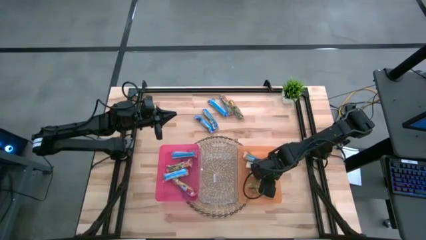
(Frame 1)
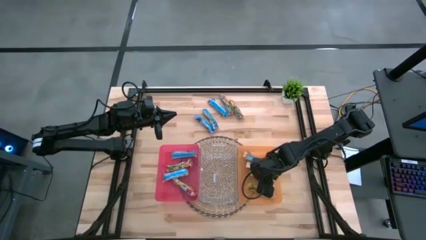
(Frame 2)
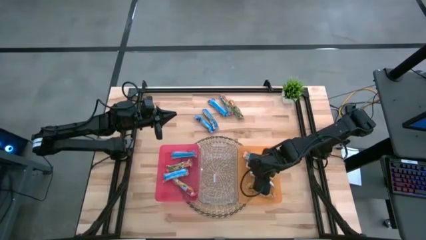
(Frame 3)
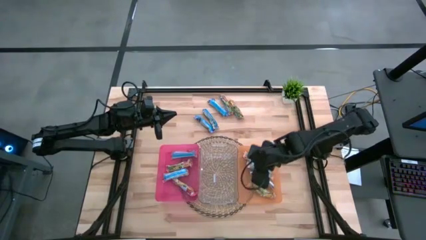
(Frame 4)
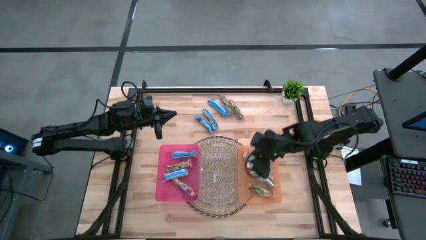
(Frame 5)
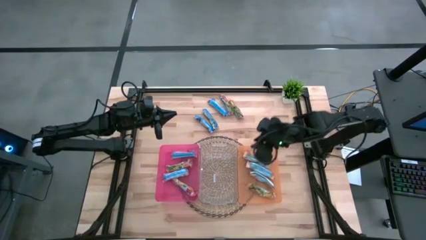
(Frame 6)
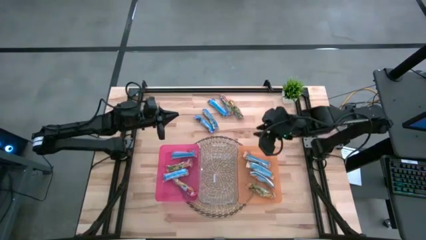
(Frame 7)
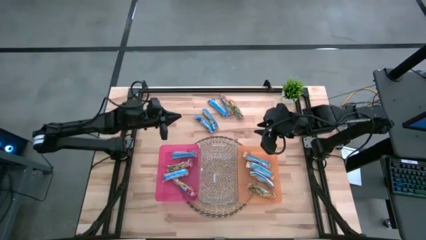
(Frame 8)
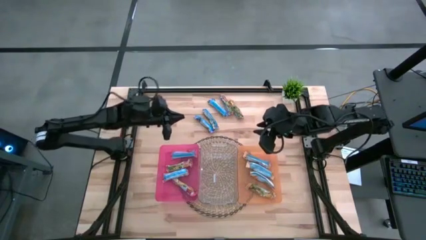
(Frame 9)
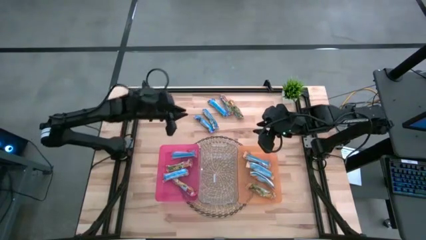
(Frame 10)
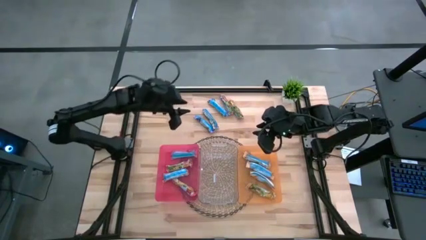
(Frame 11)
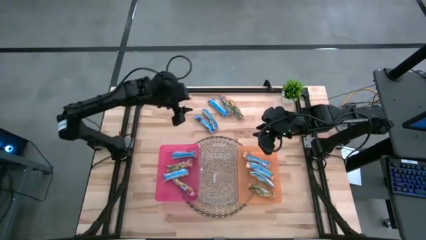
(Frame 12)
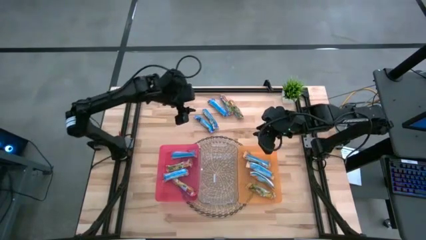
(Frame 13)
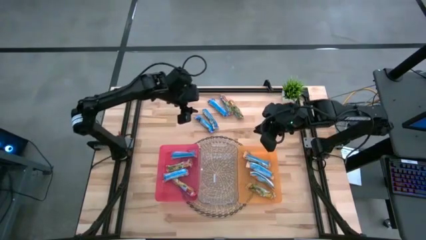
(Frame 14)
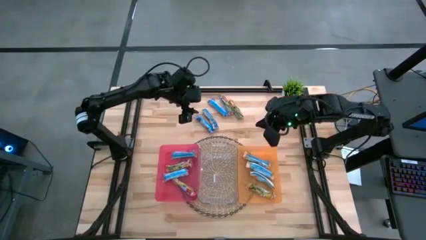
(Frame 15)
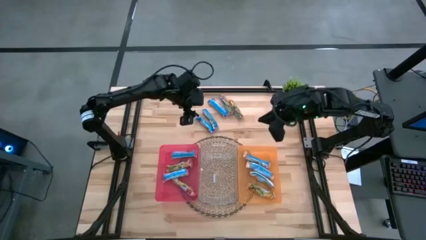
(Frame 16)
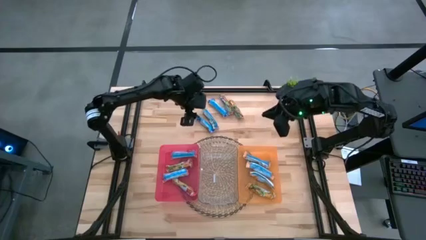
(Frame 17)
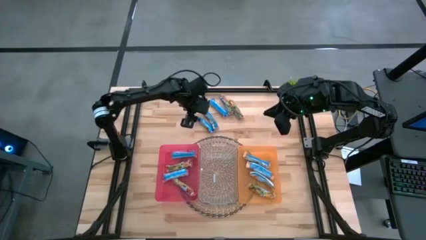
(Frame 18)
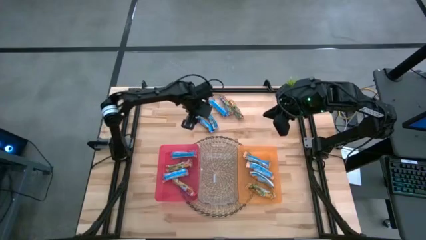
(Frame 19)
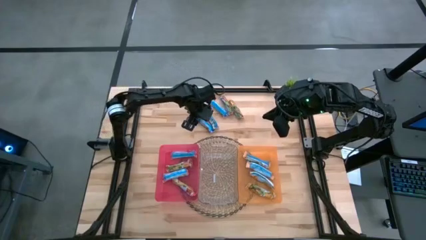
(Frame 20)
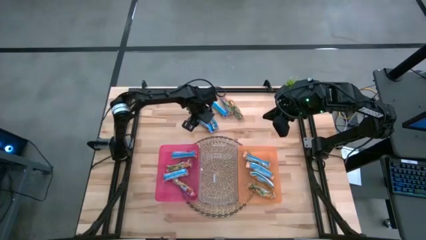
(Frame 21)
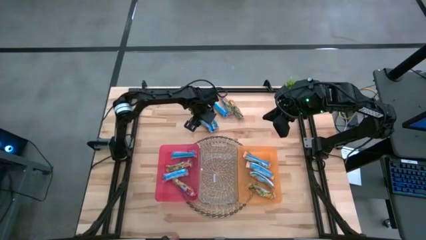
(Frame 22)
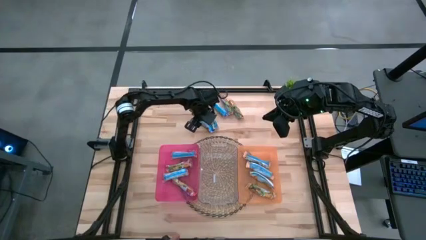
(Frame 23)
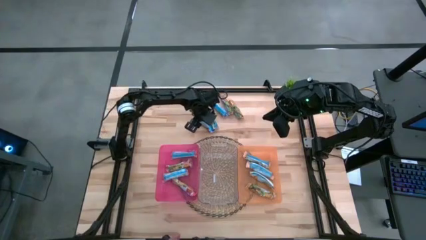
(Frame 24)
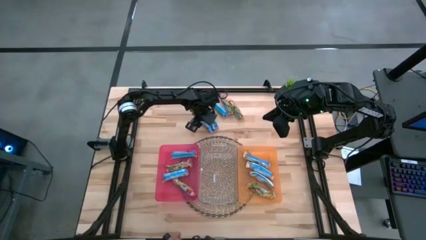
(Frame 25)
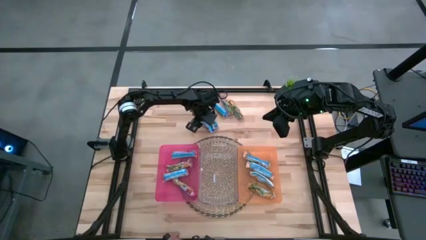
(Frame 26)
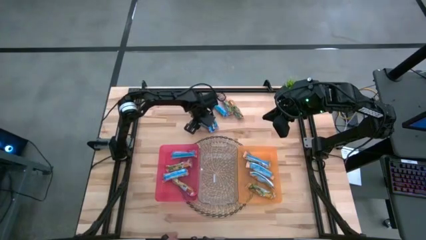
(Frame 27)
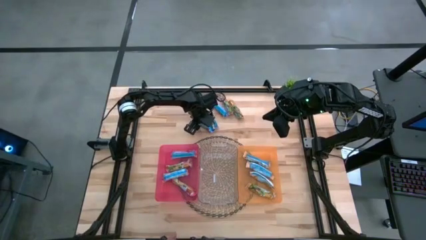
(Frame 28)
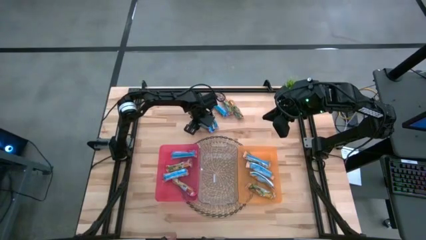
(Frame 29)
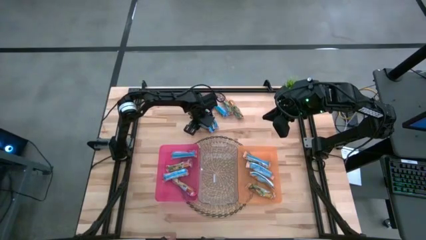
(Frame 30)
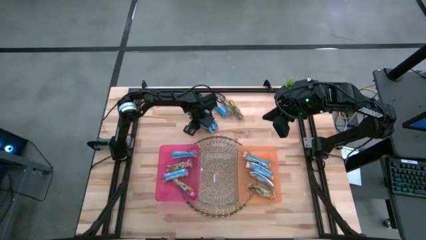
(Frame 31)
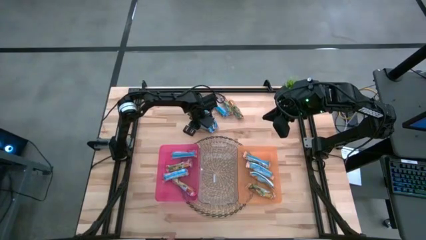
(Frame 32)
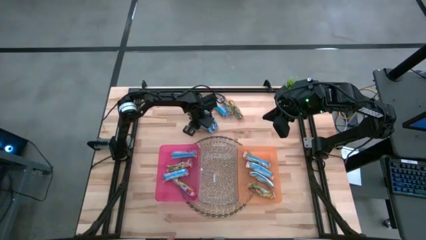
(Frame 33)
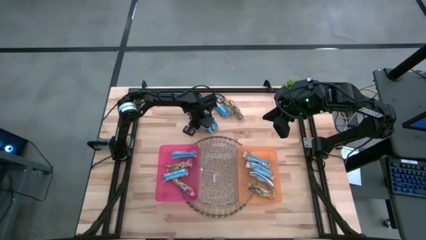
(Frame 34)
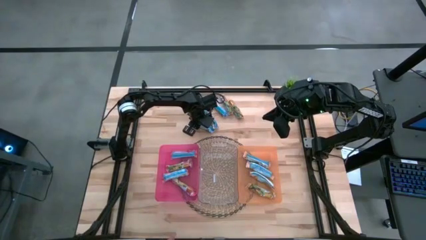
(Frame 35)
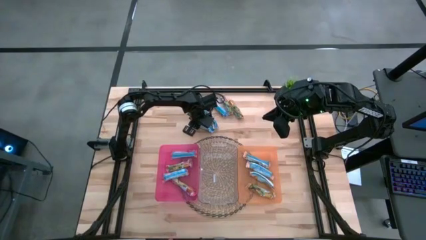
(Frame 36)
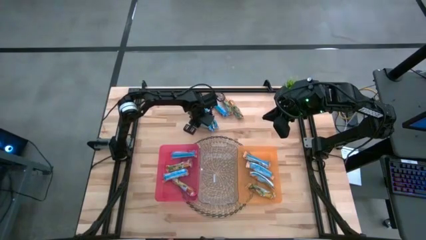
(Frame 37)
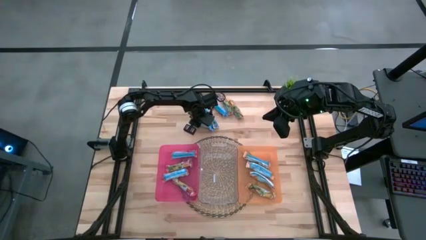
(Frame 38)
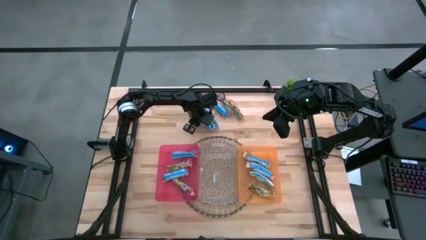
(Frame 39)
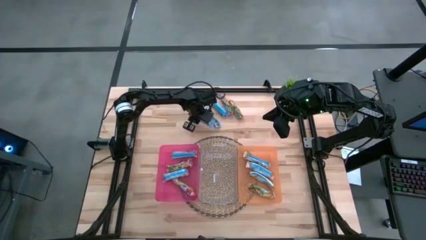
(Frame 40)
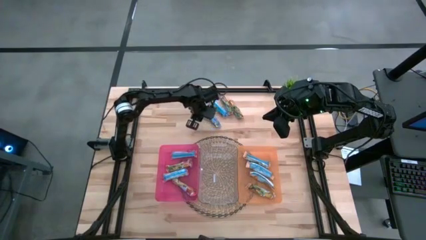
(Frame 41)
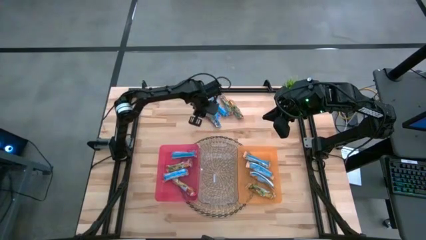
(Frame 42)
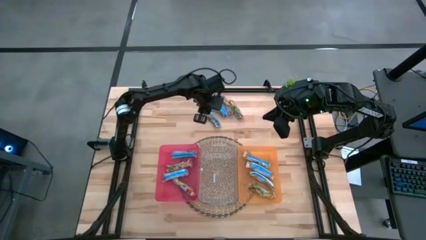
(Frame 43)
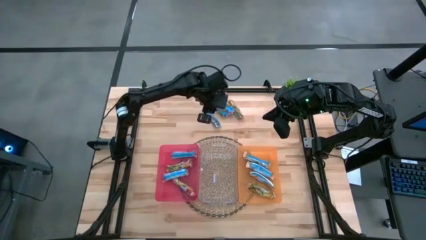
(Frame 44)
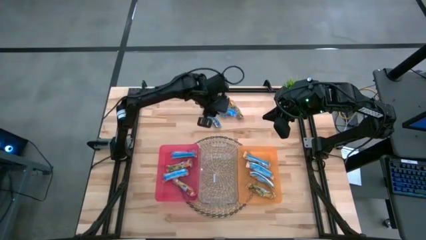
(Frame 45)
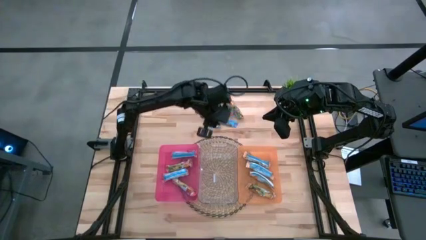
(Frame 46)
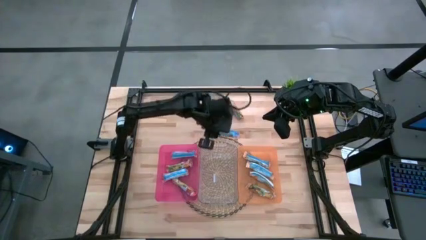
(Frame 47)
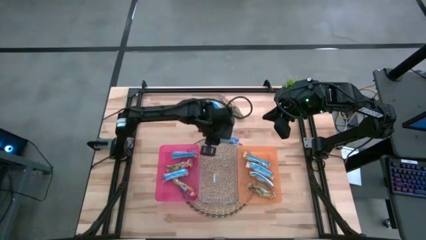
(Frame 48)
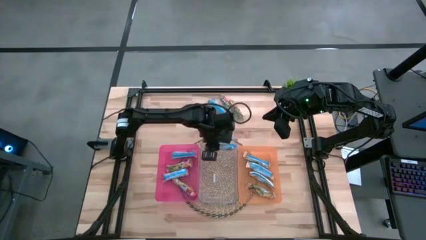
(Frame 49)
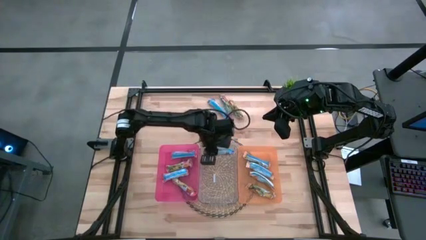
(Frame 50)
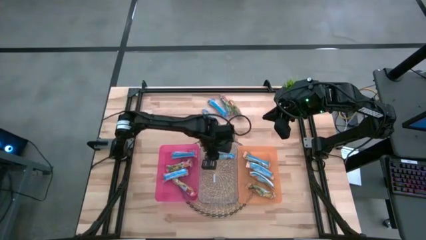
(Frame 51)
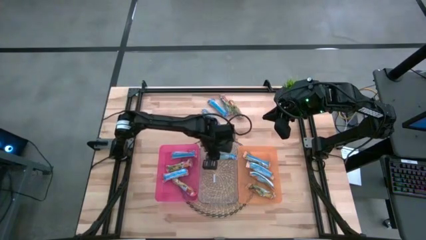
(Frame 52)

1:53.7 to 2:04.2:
Task: Pick and place Granola Bars by type
Put the blue granola bar into the transparent bin

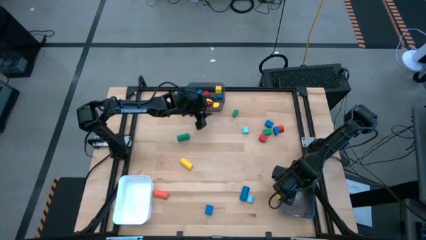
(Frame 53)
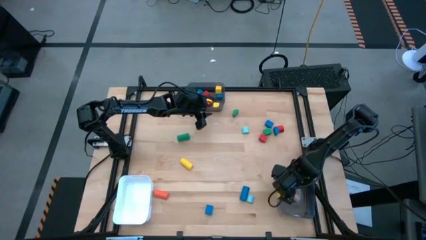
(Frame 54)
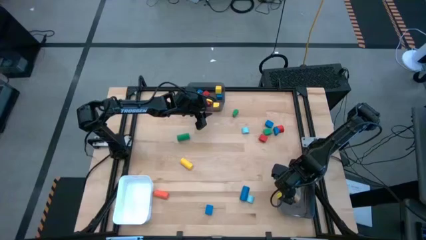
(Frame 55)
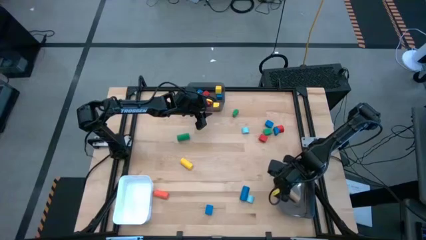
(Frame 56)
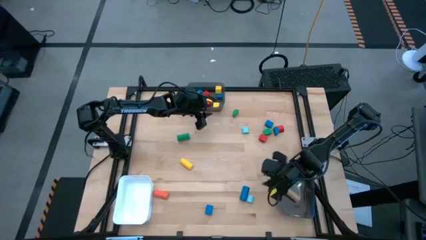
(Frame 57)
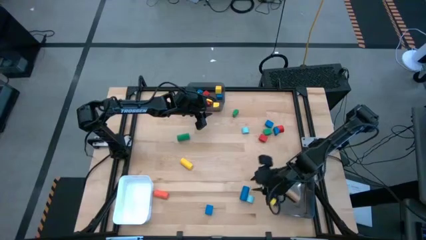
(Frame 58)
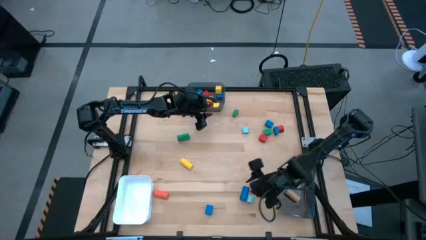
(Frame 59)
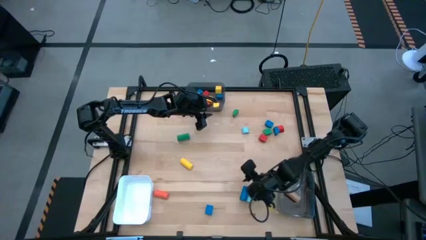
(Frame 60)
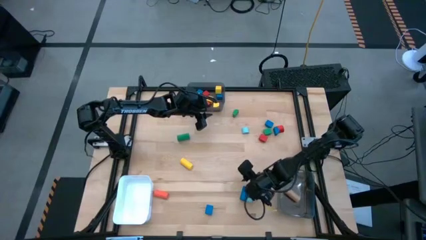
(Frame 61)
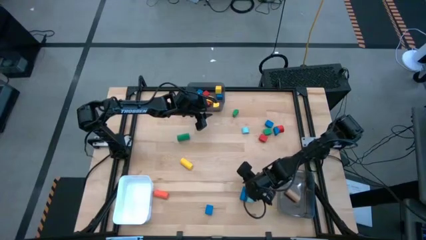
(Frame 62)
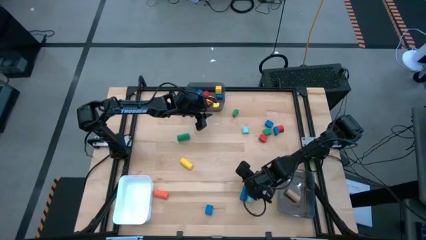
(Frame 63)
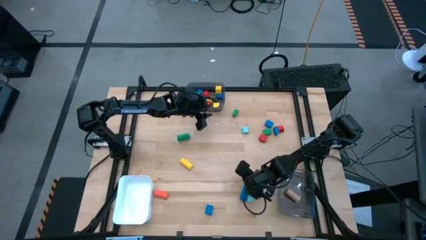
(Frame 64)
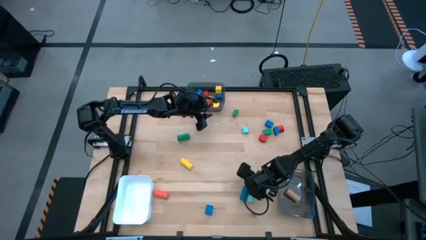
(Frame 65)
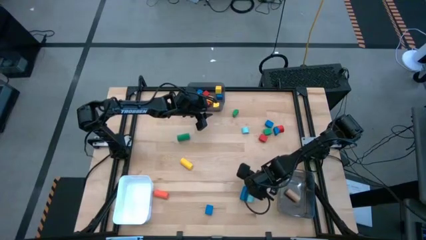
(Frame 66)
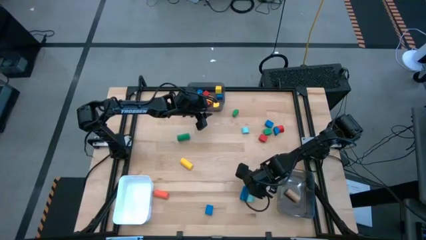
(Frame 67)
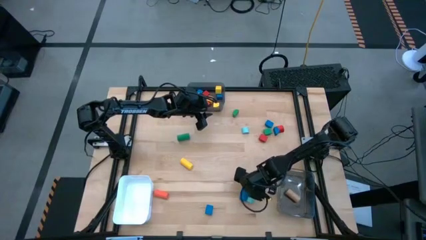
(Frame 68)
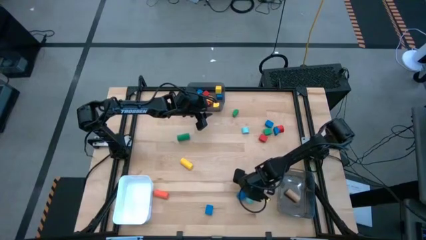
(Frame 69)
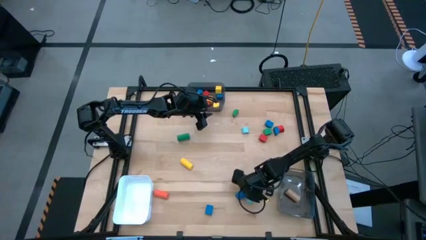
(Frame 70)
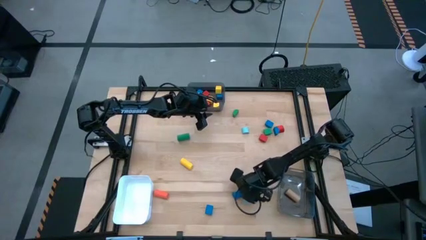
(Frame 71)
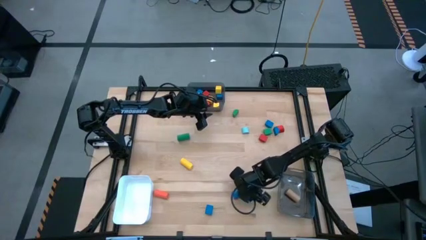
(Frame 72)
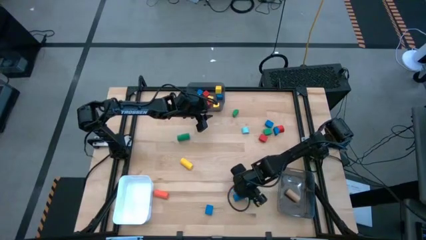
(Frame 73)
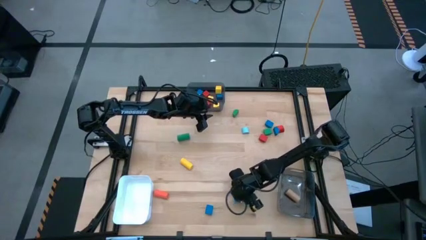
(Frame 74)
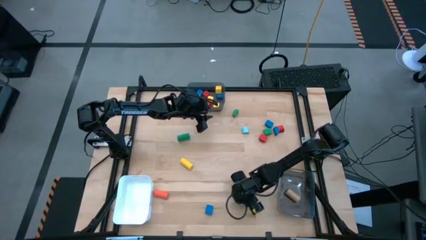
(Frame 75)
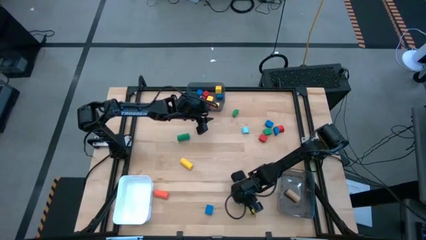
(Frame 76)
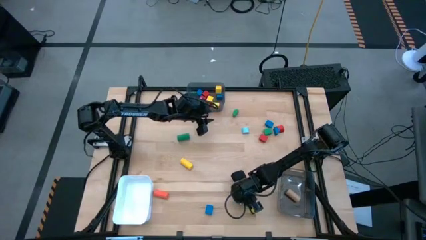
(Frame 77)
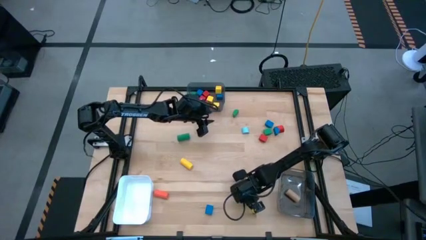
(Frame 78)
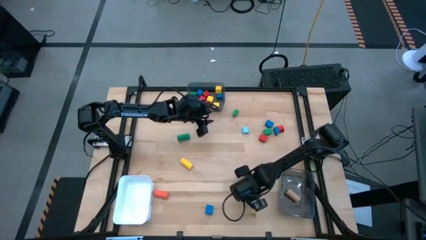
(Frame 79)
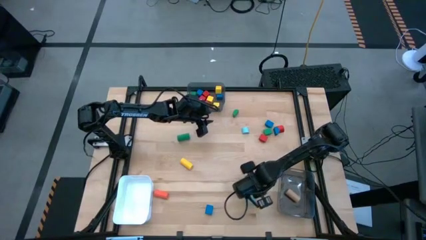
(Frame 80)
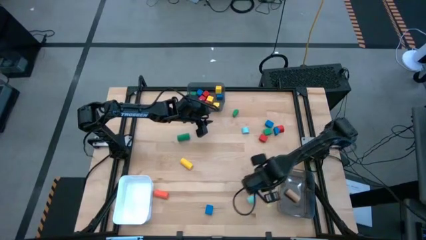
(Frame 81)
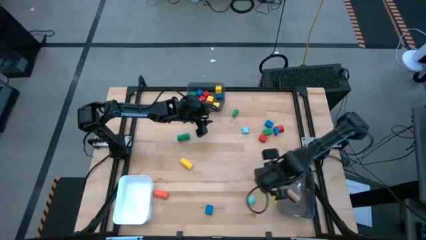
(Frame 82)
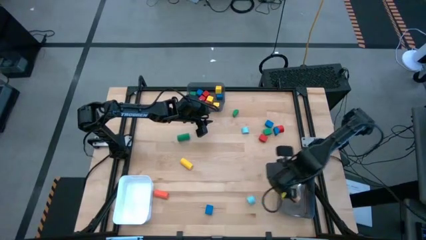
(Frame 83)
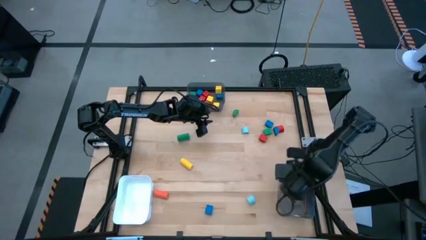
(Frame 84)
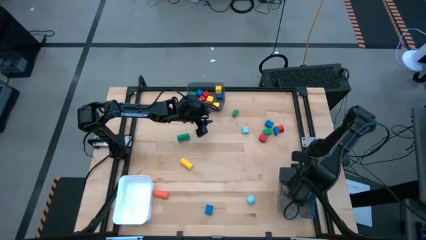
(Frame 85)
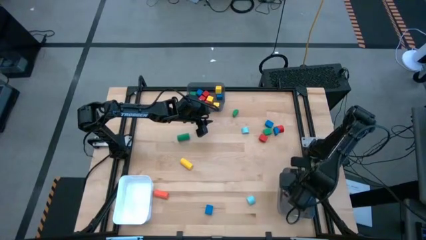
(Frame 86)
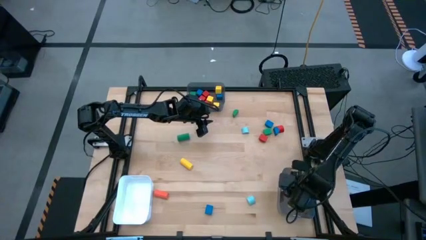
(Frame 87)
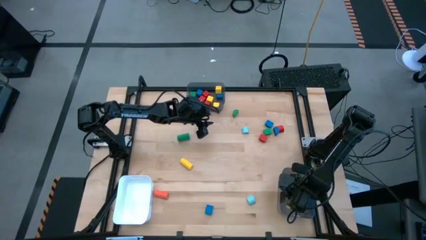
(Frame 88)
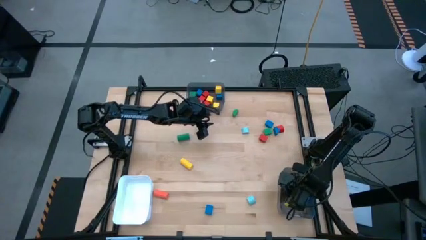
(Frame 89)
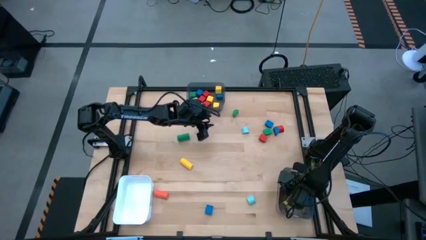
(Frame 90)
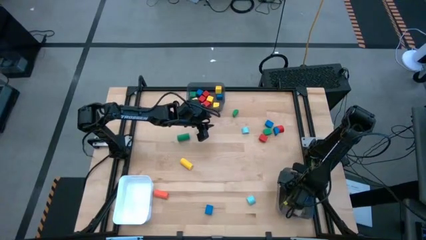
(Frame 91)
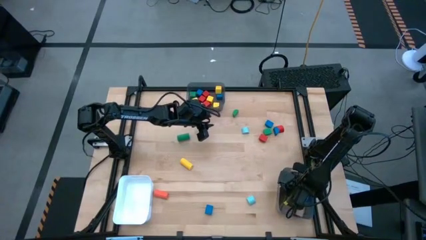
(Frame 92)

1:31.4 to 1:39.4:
Task: Sort blocks by size
Put the blue cylindrical block into the bottom black bin
